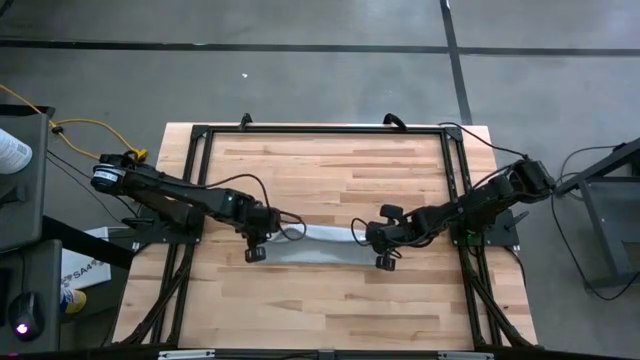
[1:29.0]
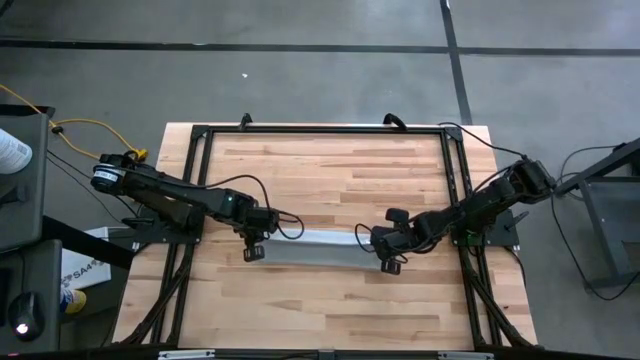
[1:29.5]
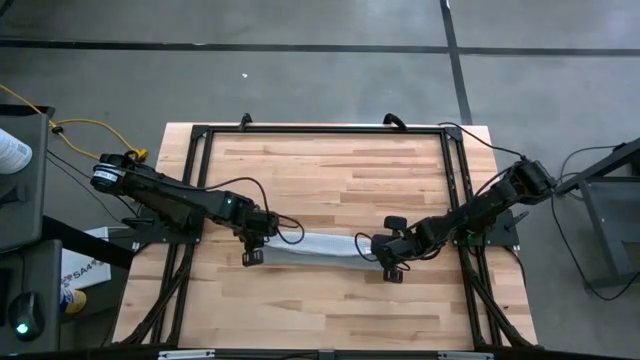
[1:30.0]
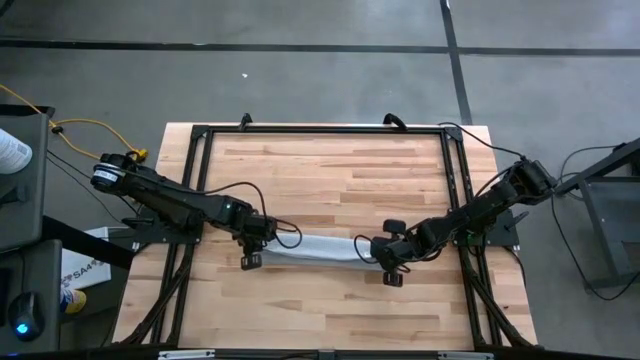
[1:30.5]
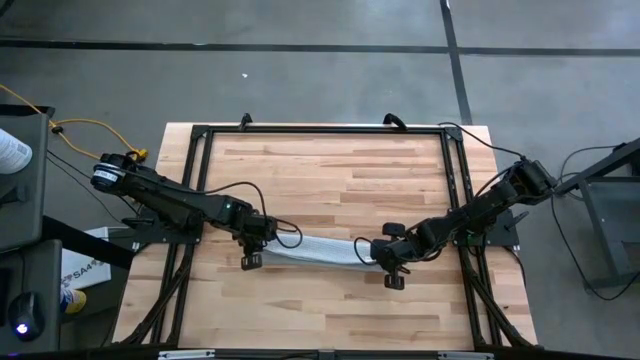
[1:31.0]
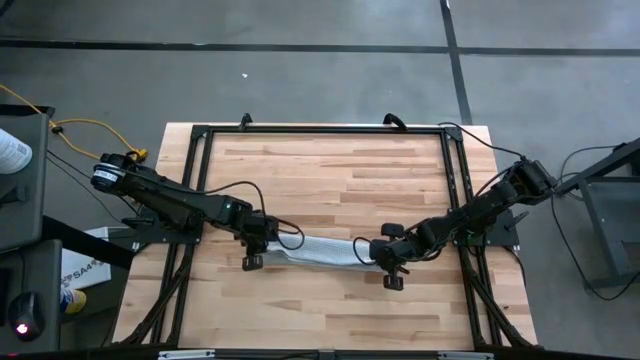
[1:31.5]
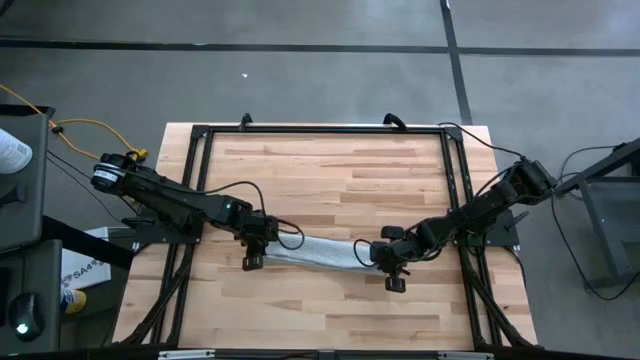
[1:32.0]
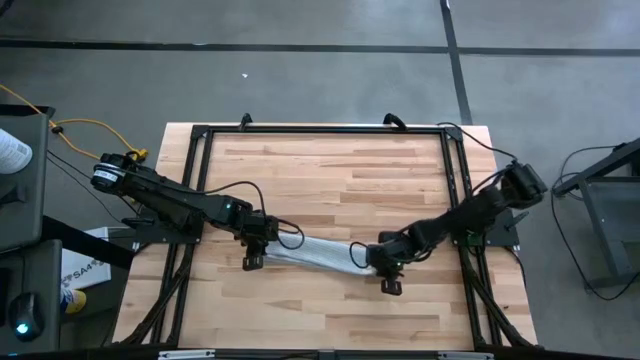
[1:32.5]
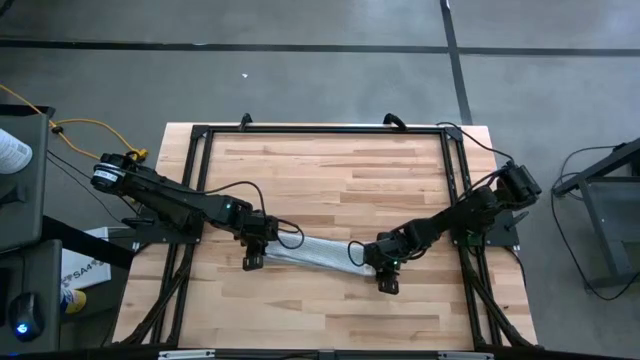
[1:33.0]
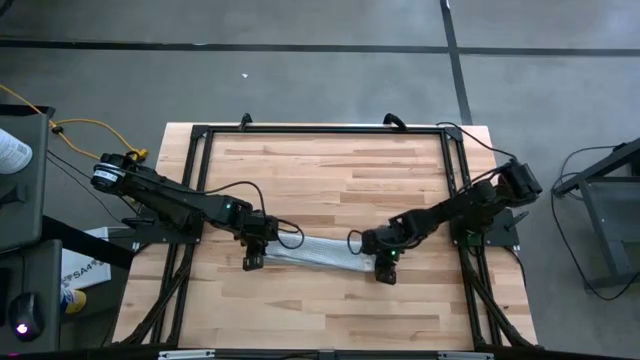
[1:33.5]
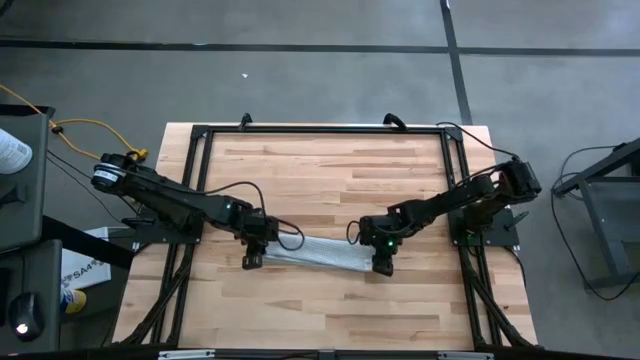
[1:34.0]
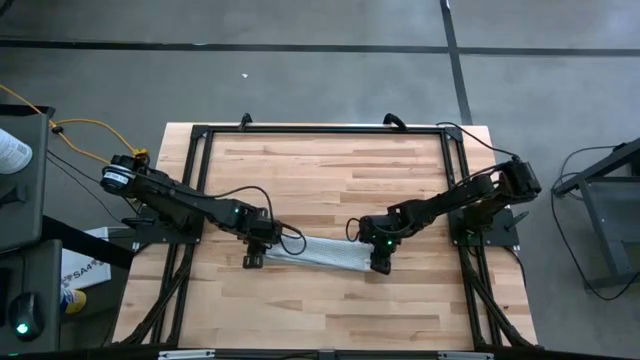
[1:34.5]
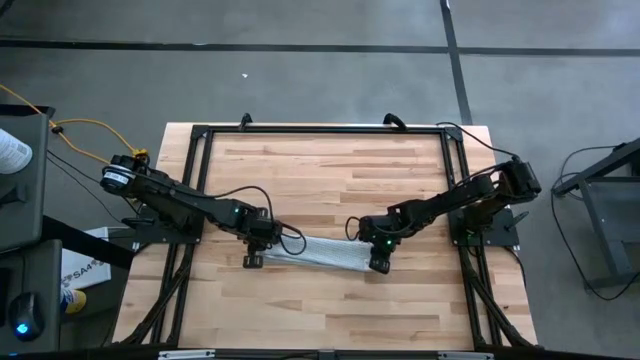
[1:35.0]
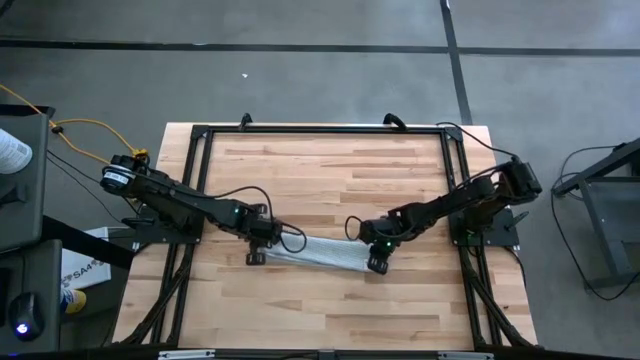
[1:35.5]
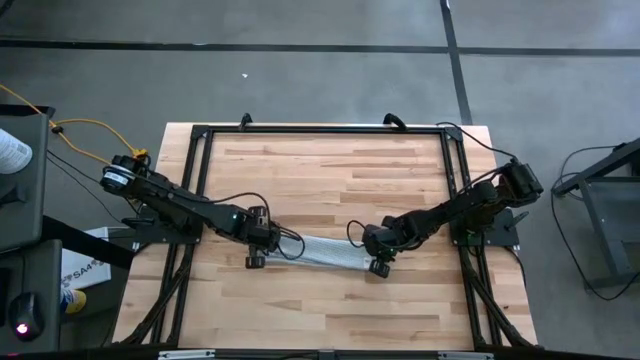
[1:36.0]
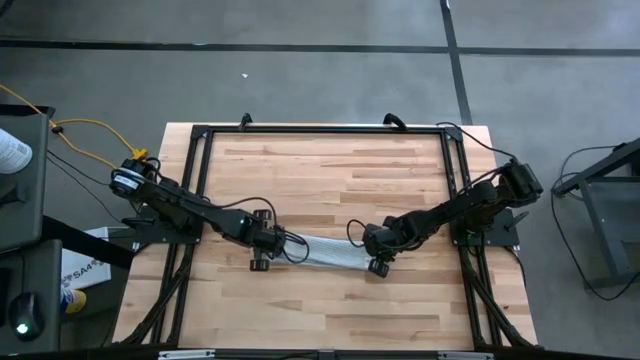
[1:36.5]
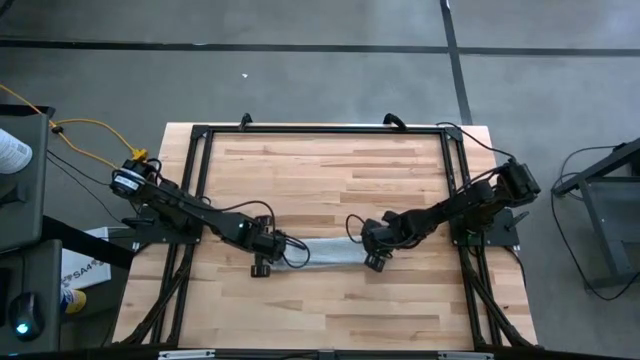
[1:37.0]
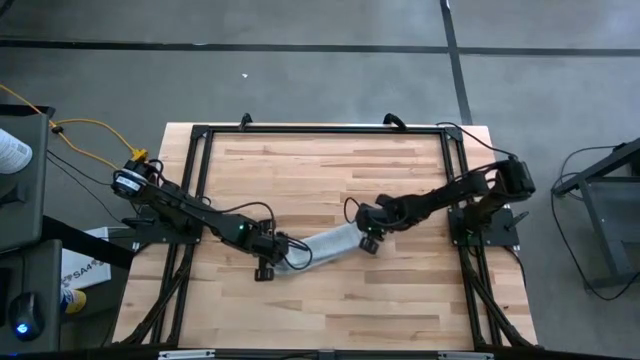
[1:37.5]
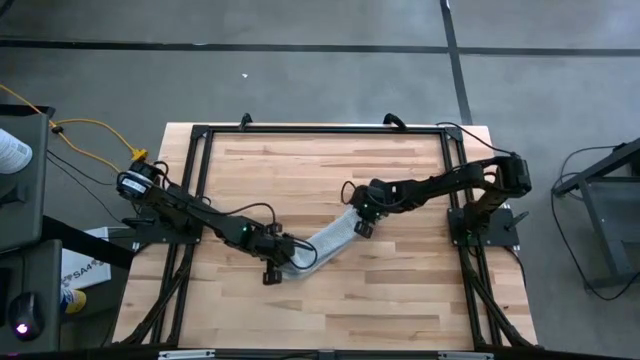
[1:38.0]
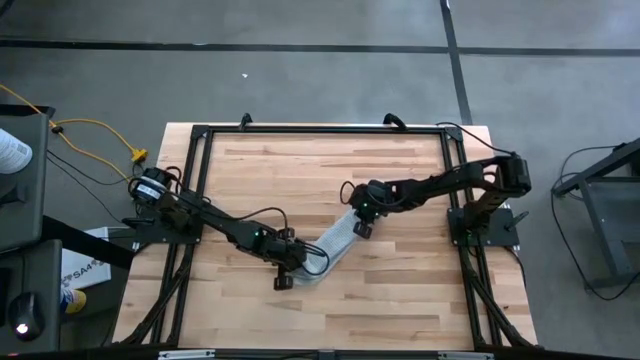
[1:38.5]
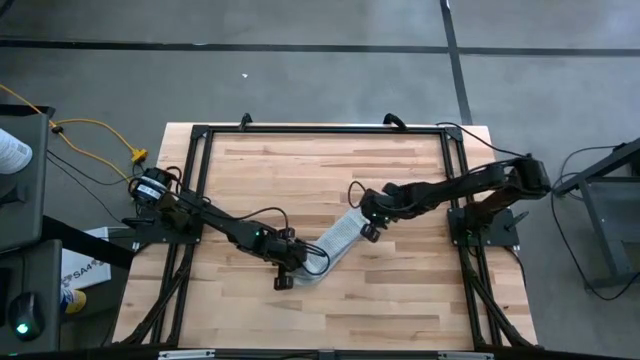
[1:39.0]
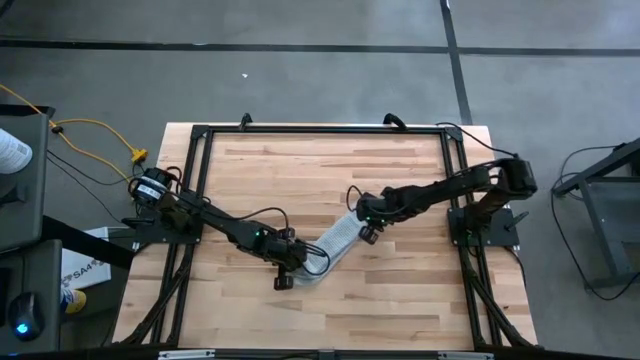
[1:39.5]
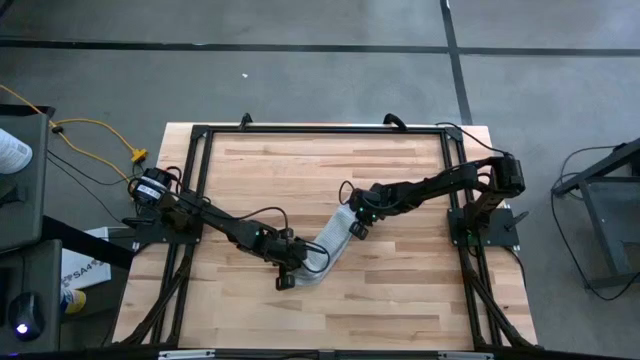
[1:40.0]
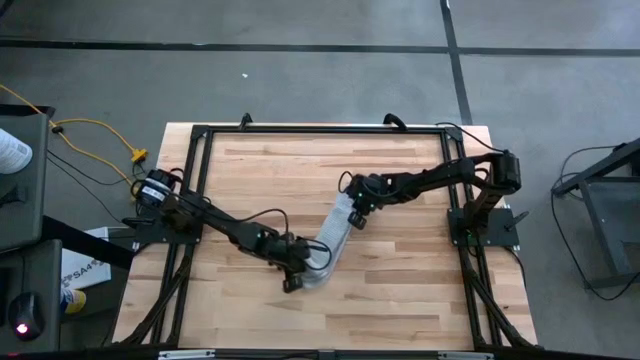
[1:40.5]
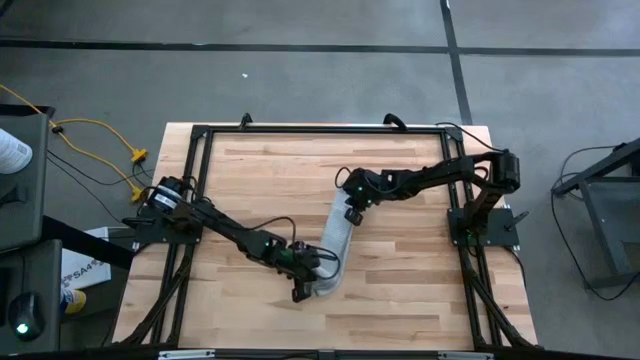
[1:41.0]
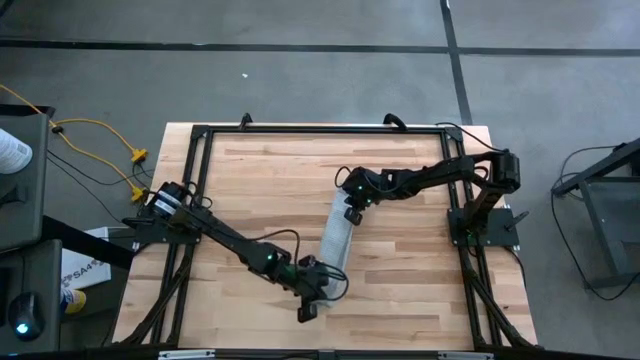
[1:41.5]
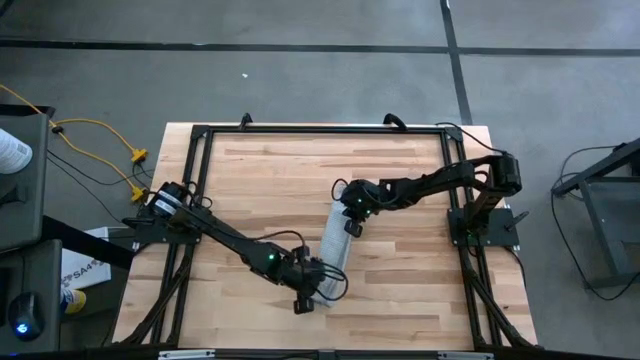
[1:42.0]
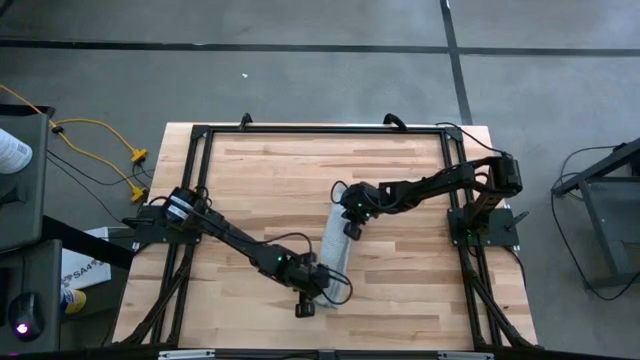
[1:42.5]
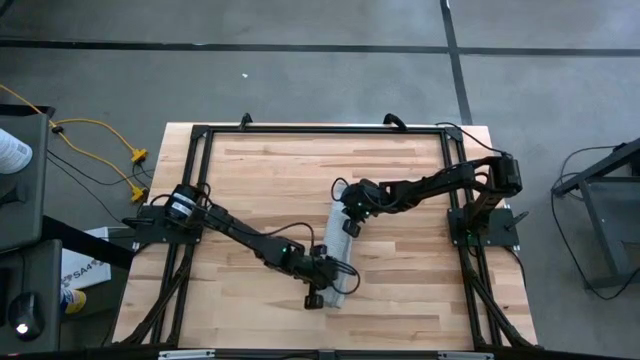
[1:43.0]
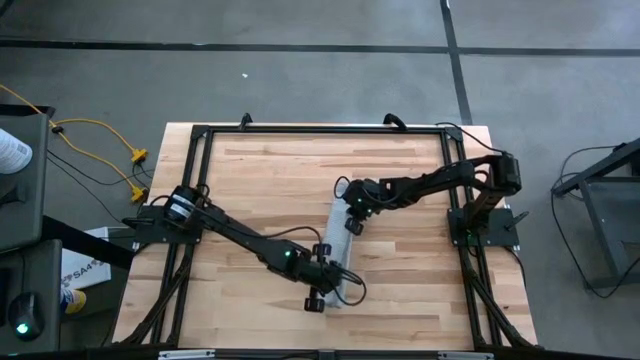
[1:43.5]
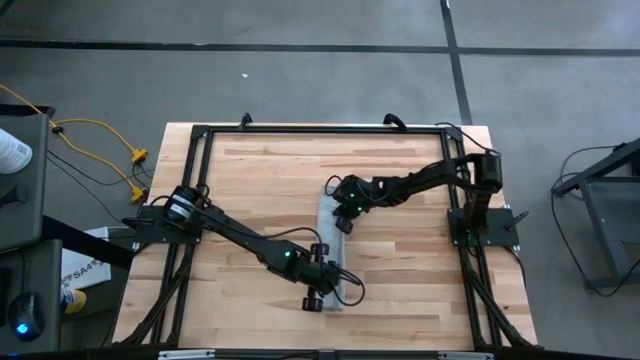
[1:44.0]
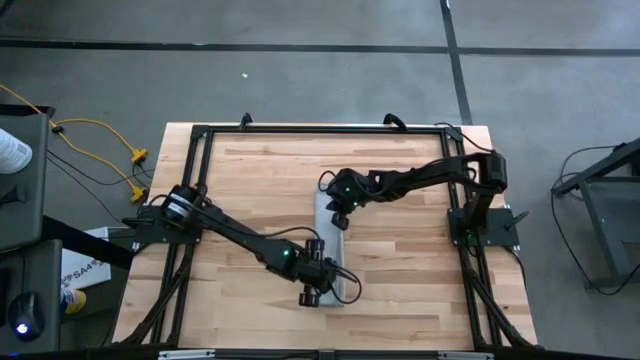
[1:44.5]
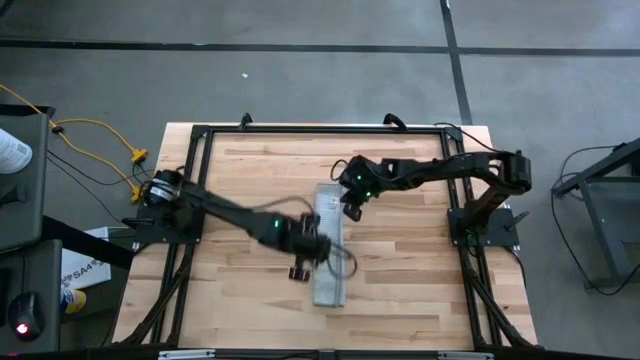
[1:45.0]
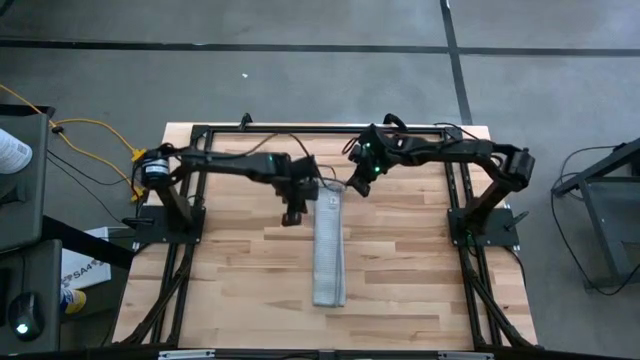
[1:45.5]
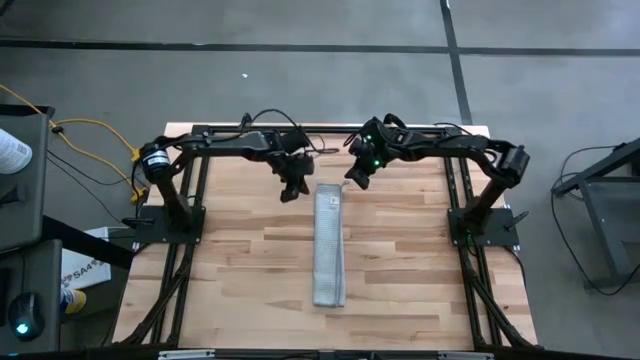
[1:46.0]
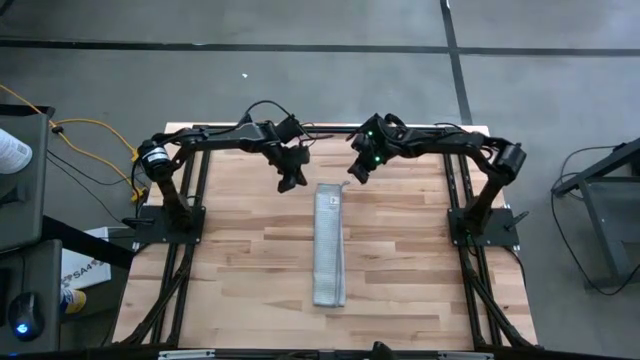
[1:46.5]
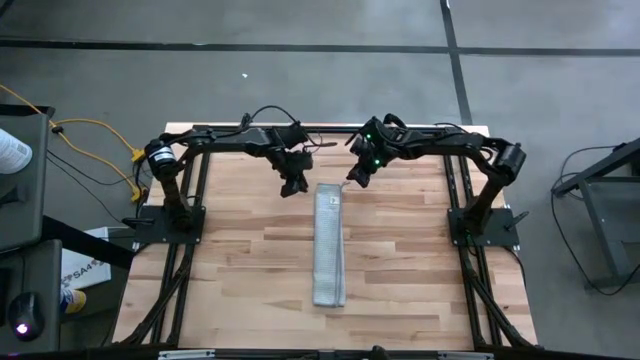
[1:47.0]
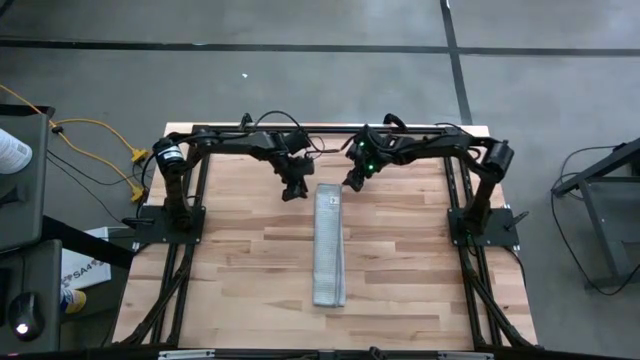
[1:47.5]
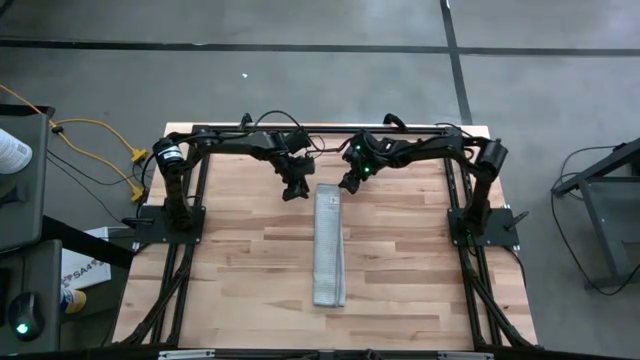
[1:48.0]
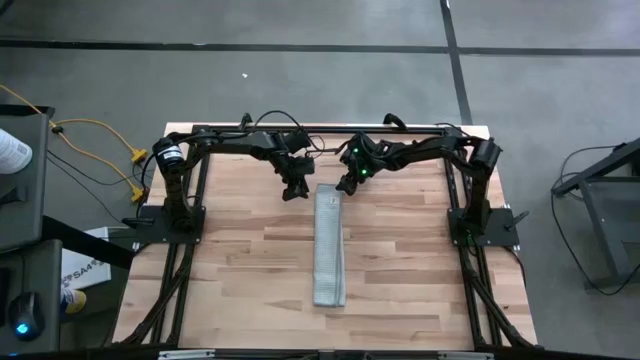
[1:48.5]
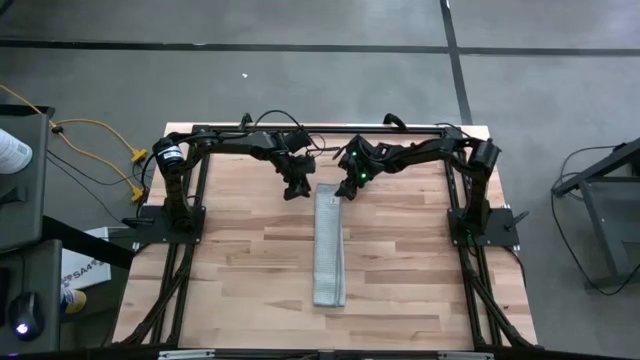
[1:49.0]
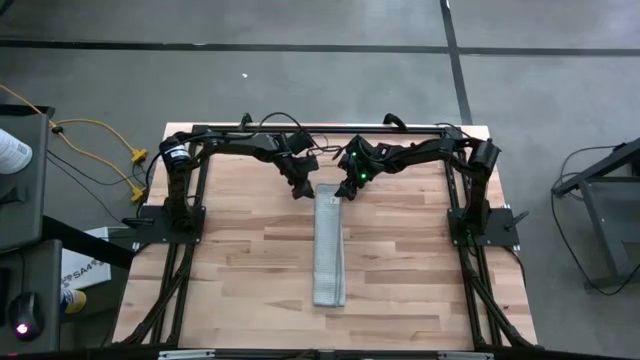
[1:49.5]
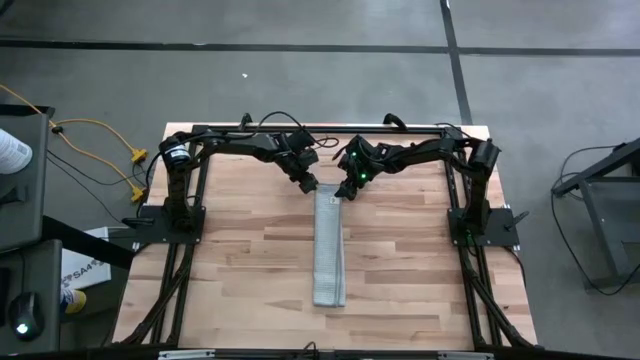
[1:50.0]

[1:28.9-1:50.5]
Task: Fold microfiber towels
Fold the gray towel
